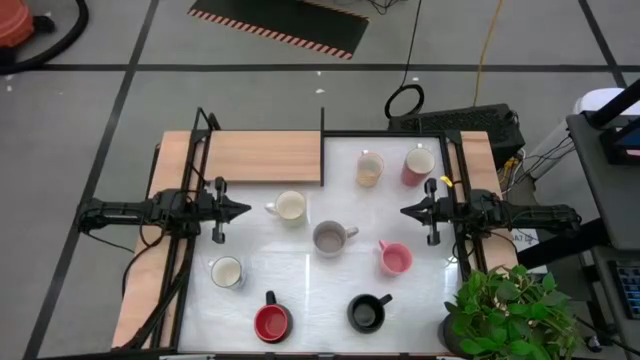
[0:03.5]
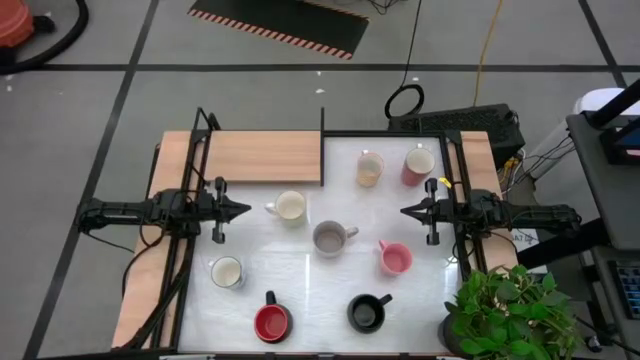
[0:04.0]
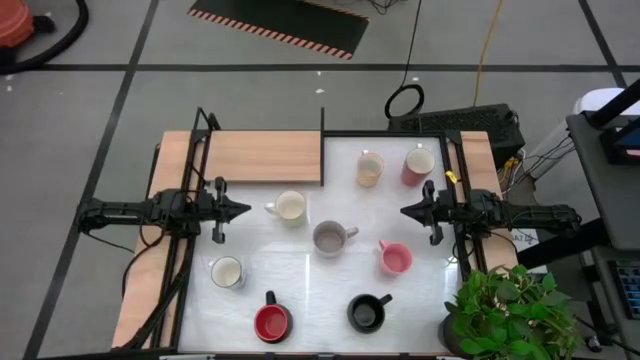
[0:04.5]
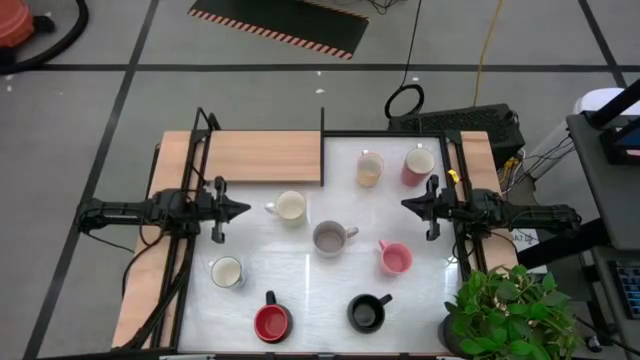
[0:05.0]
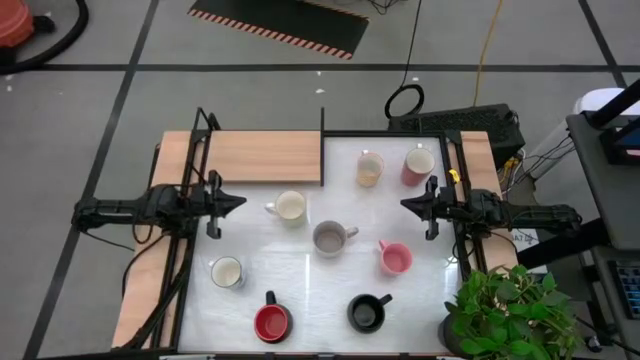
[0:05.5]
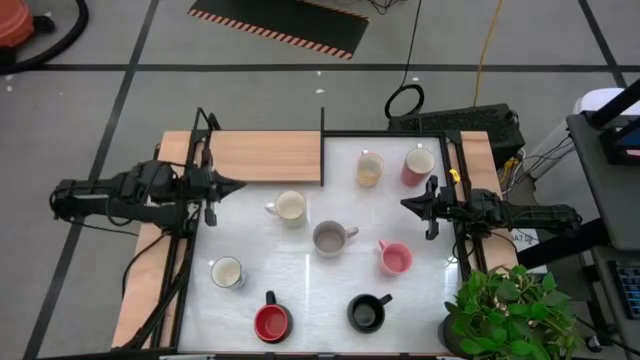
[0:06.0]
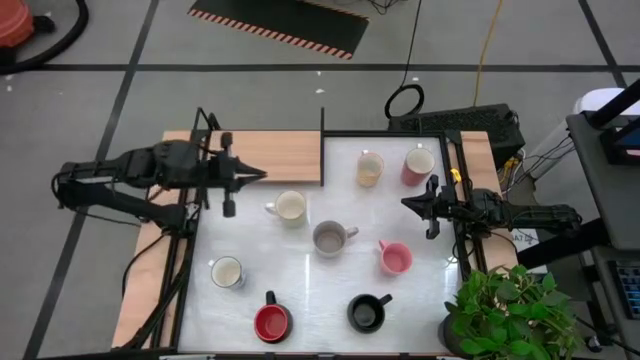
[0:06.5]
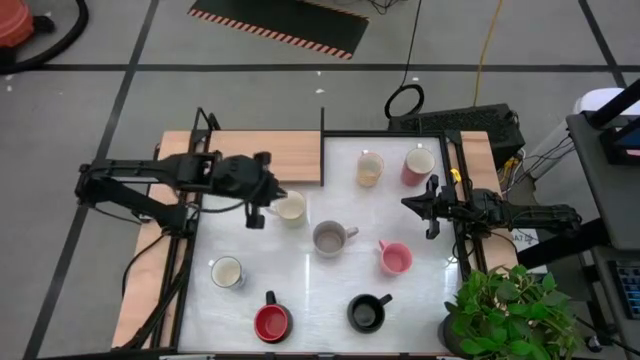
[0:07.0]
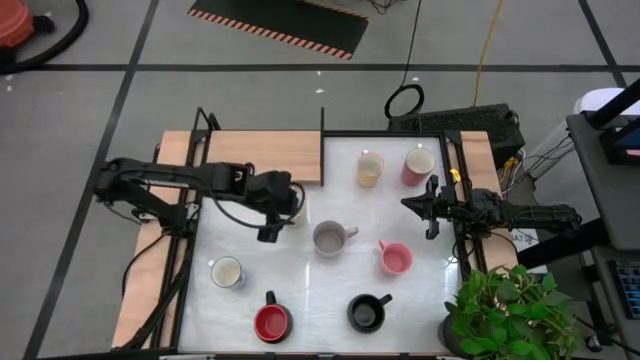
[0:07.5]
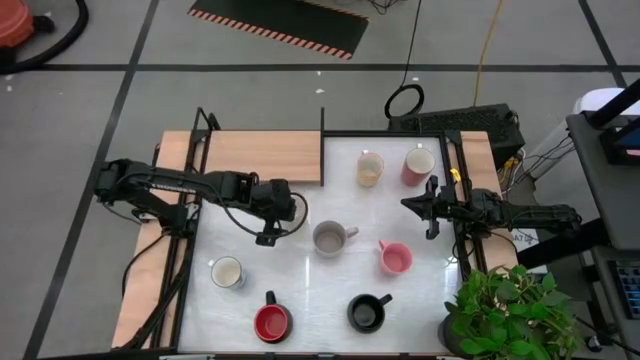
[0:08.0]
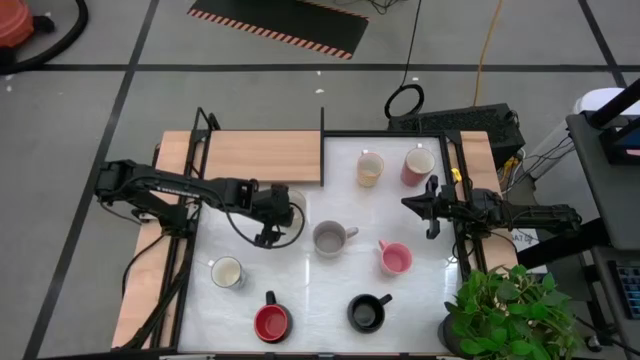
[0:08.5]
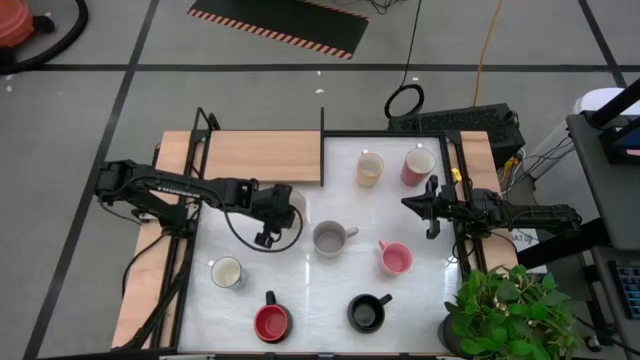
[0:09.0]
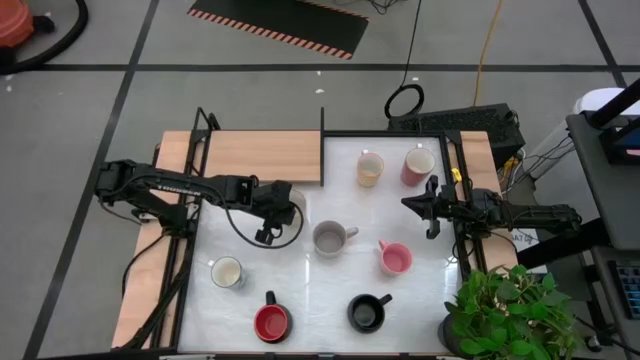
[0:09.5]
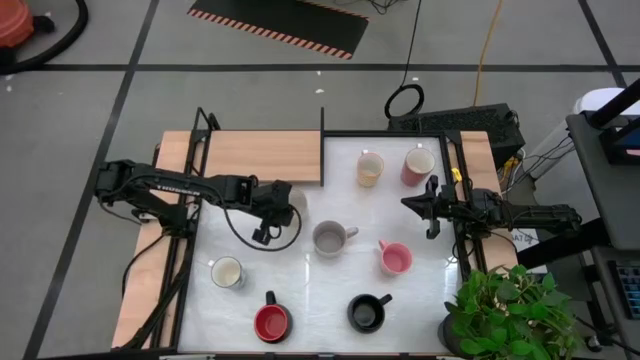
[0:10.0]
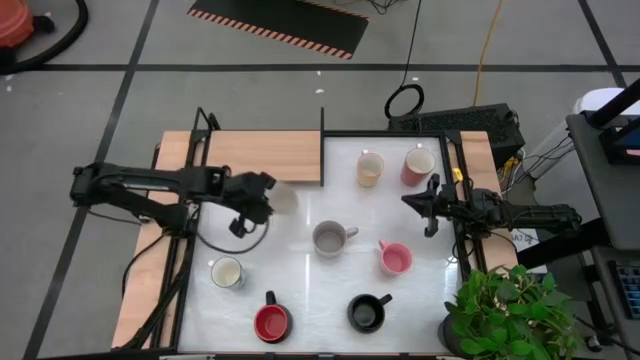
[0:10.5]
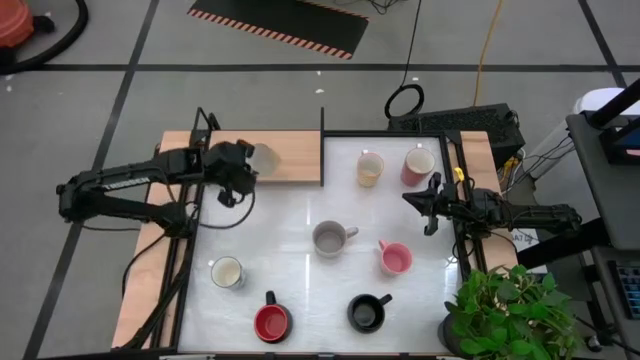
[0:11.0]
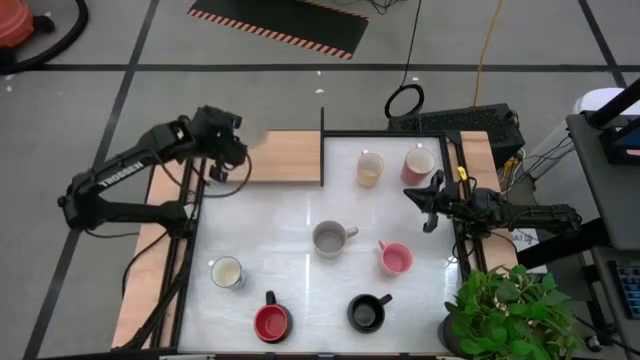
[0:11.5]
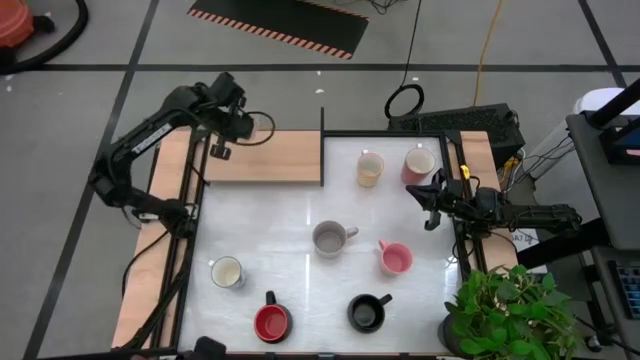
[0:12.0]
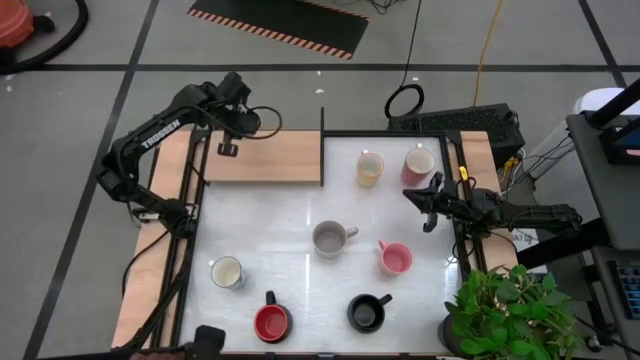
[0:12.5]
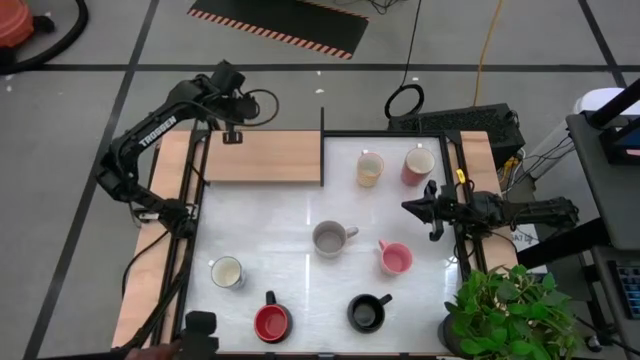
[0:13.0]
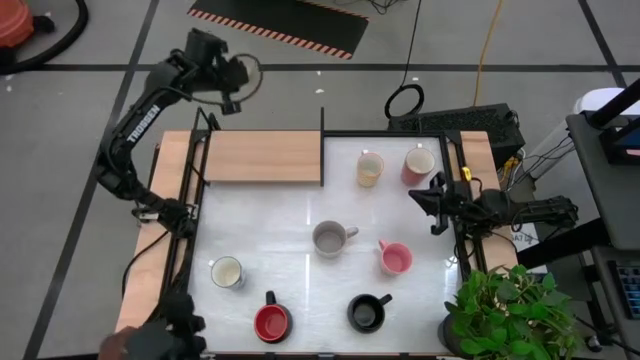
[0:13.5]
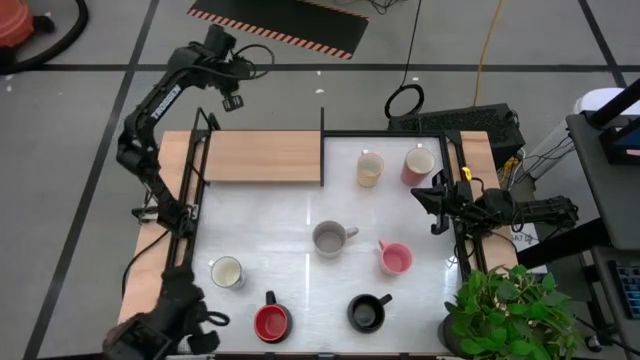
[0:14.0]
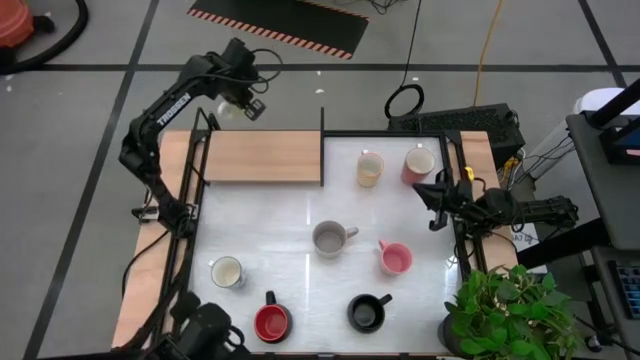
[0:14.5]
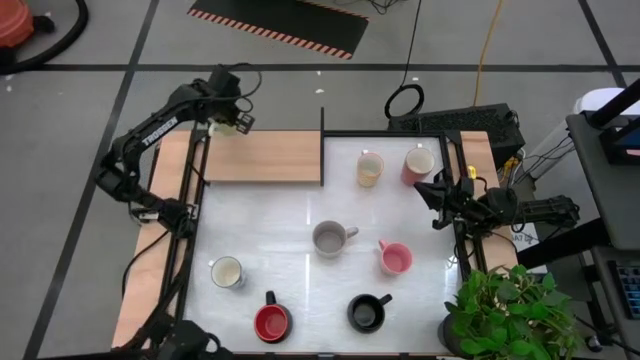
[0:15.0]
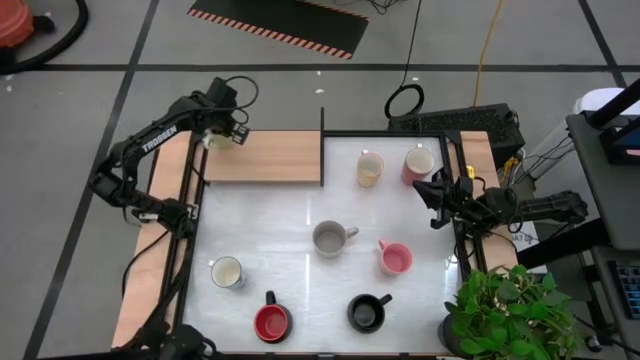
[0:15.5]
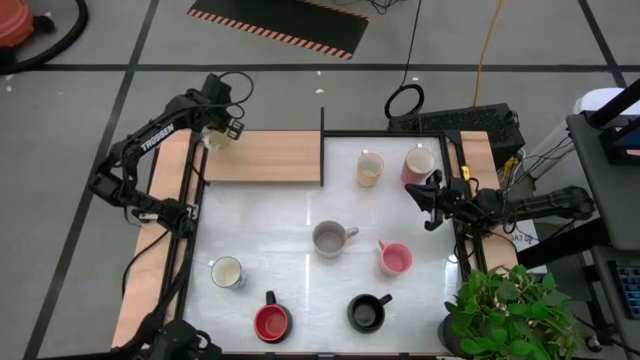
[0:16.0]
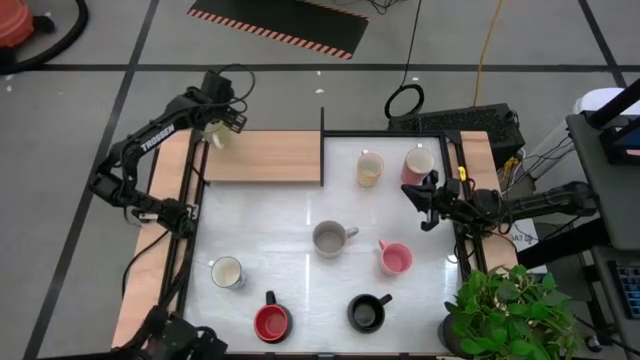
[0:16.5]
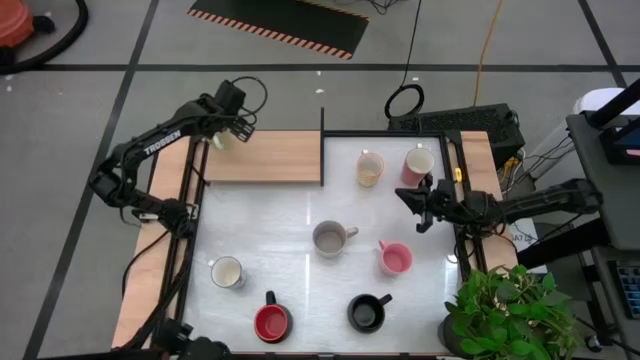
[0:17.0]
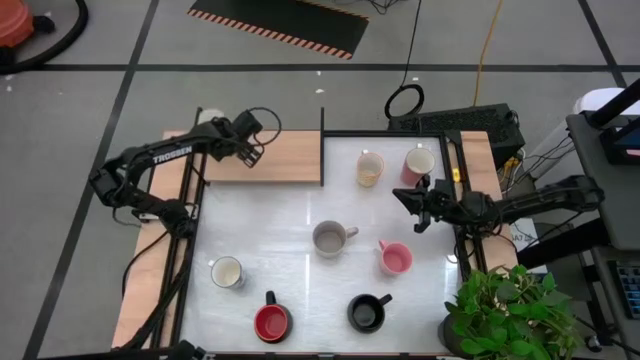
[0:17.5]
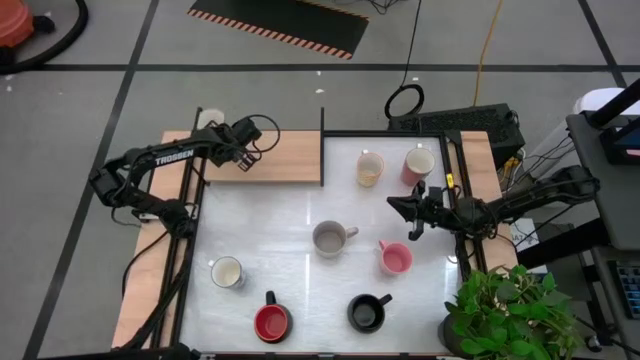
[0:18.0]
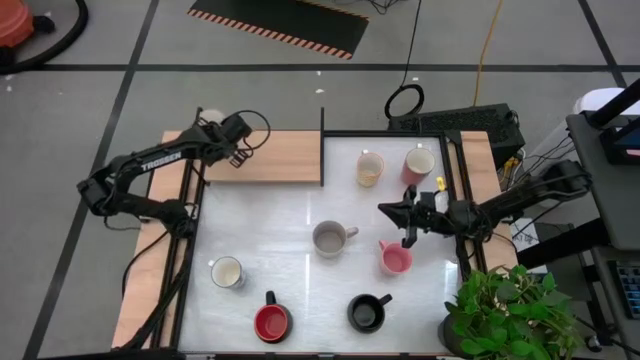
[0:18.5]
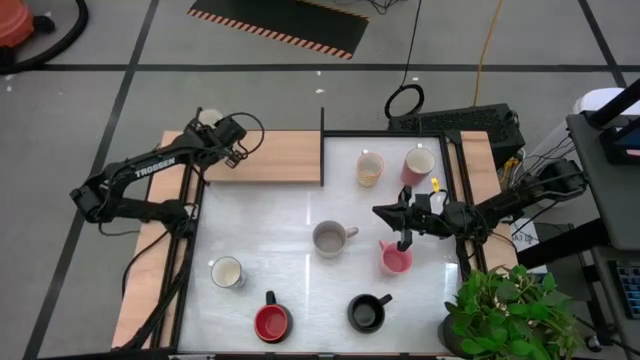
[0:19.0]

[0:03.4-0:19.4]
Task: Place coffee mugs
Put the green mug on the shelf

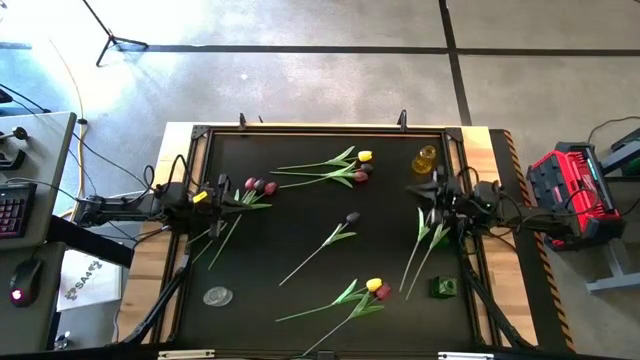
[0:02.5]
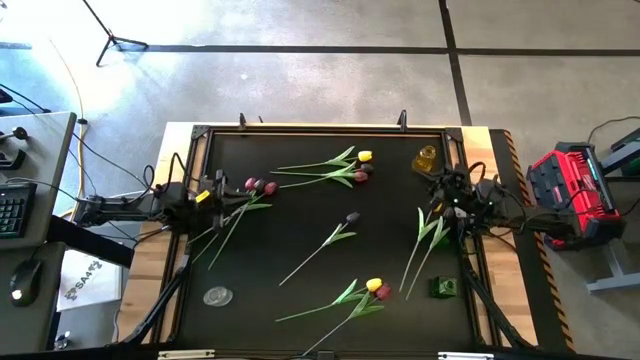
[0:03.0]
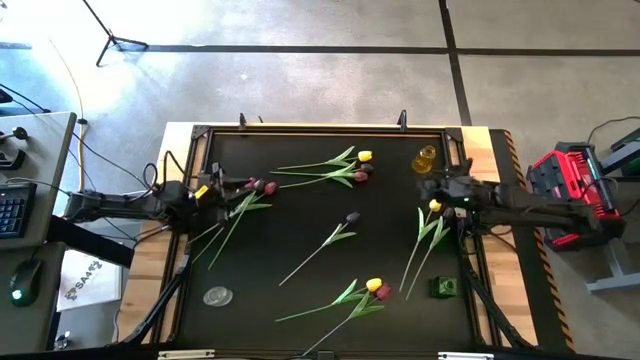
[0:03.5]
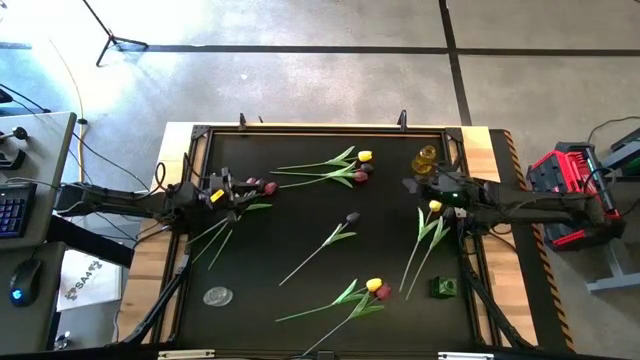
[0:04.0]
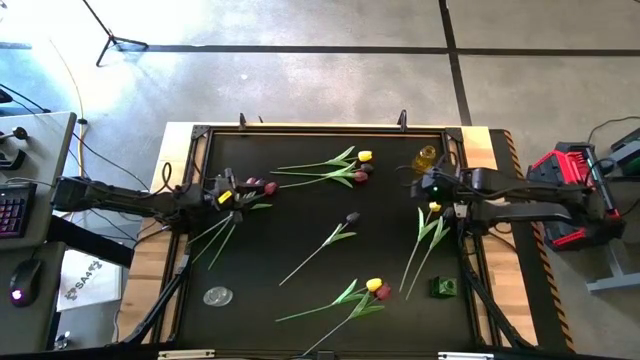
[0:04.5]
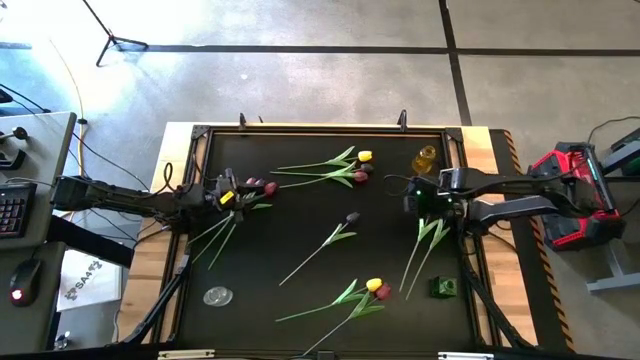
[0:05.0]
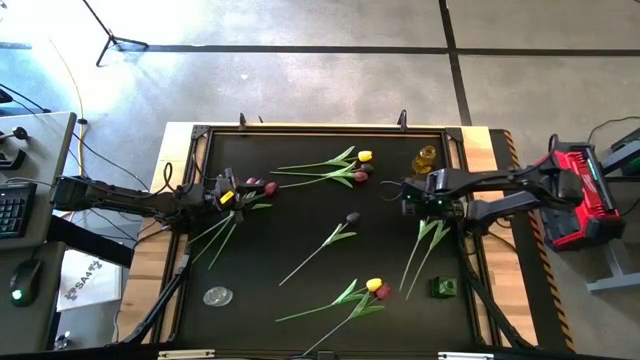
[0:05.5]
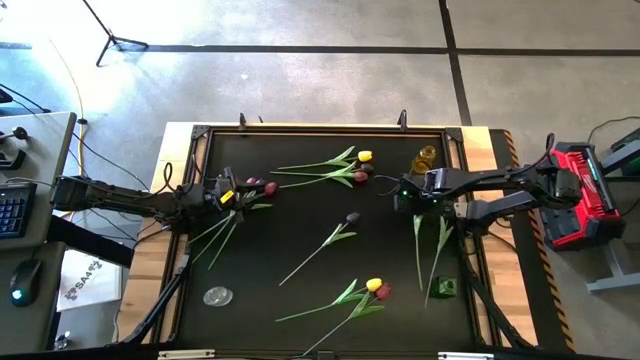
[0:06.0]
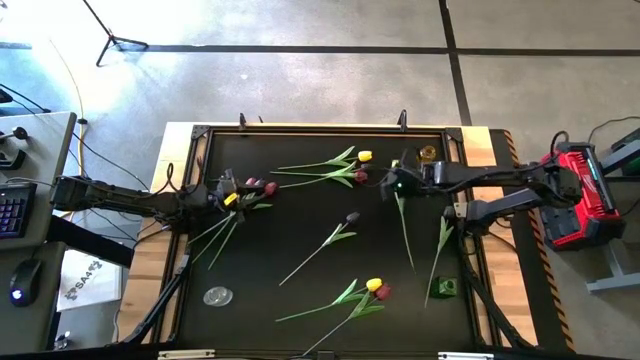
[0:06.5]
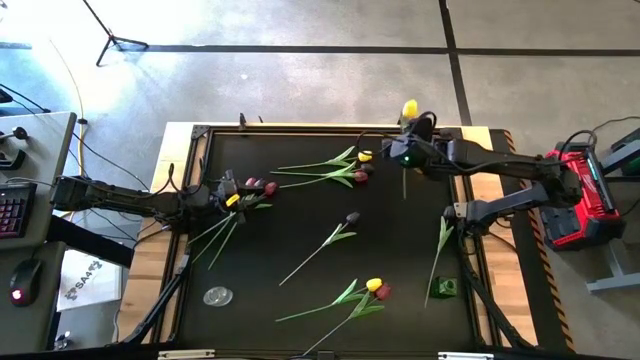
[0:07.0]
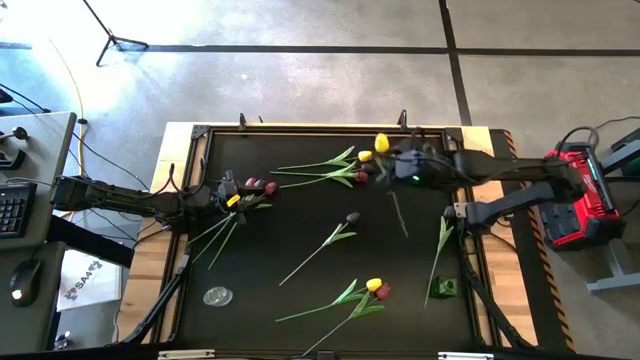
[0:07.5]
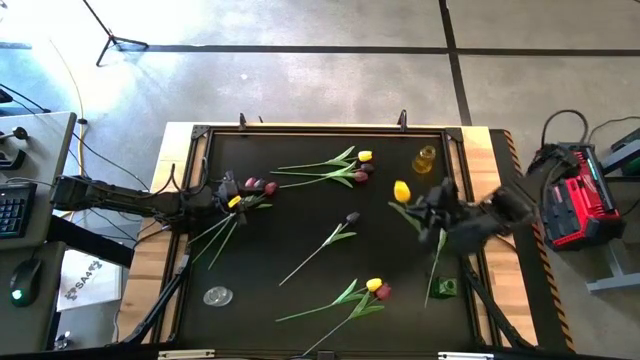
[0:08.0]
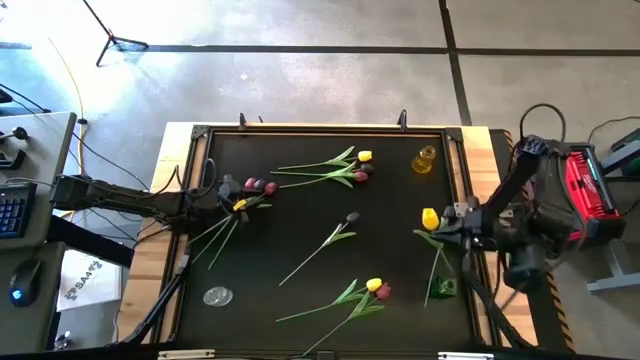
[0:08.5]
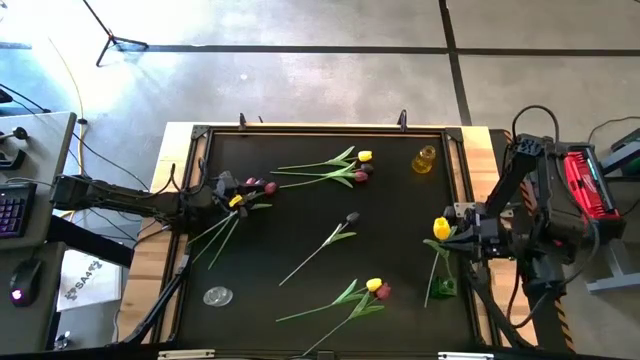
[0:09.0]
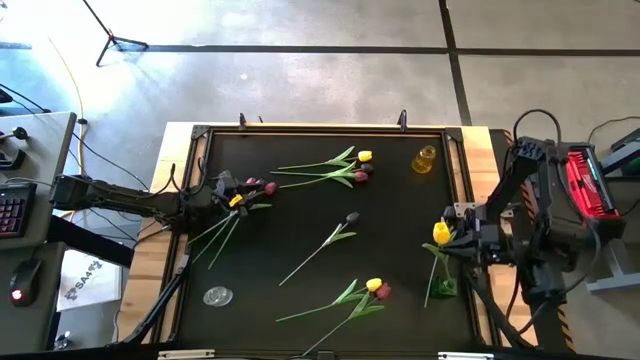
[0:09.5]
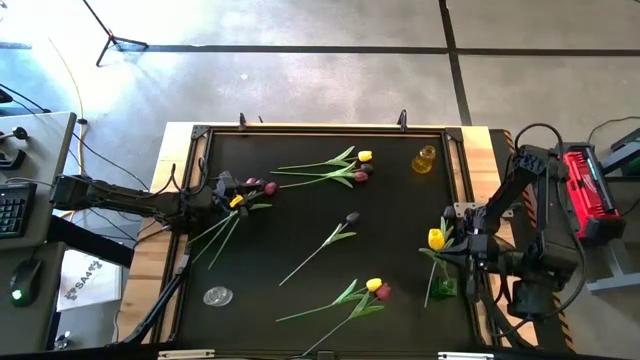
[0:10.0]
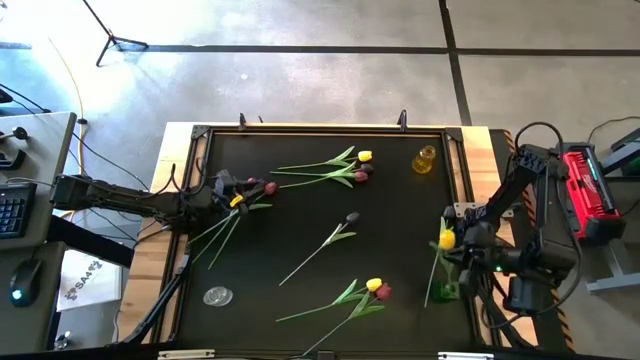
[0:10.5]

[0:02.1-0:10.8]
Task: Sort flowers into vase by color
Put the middle right yellow flower into the green vase
